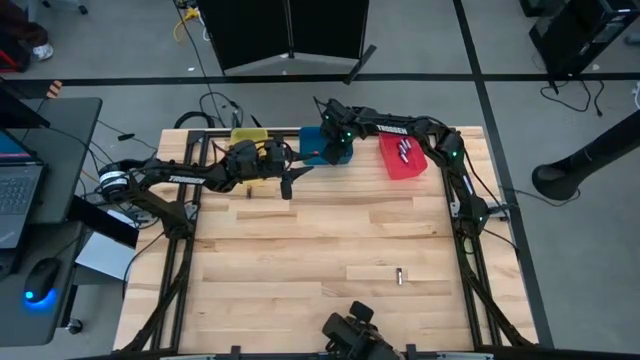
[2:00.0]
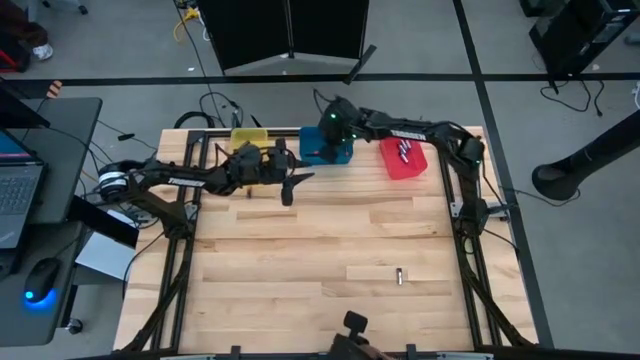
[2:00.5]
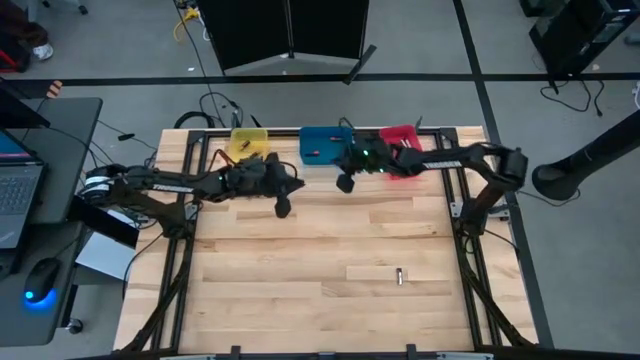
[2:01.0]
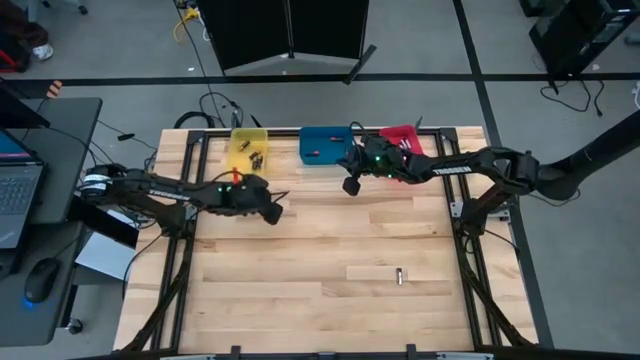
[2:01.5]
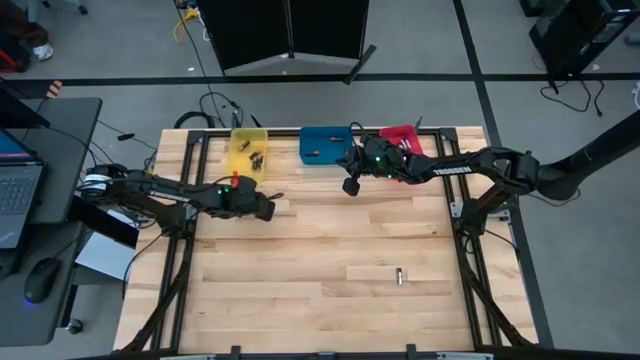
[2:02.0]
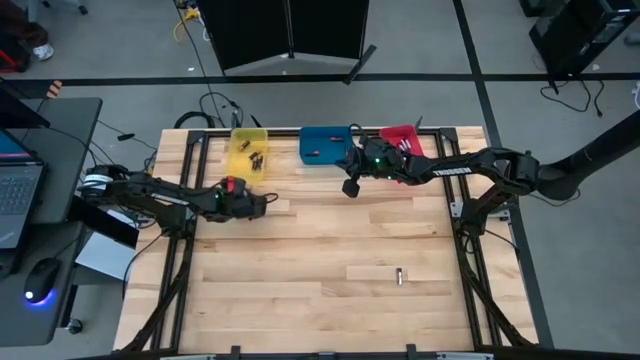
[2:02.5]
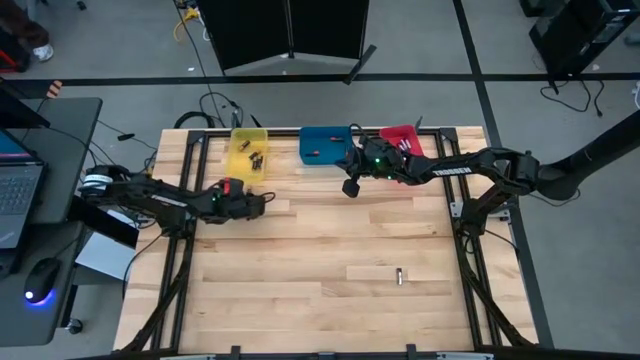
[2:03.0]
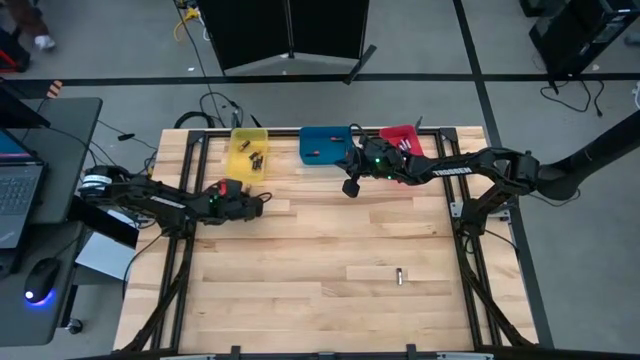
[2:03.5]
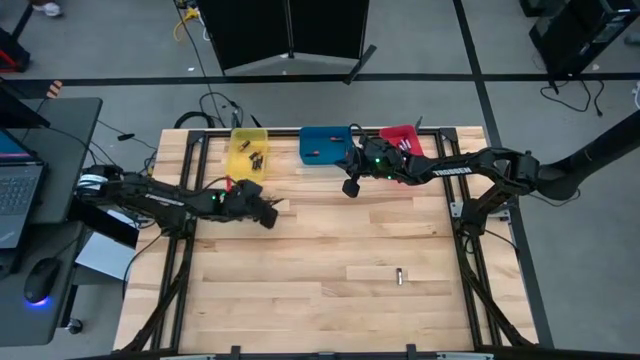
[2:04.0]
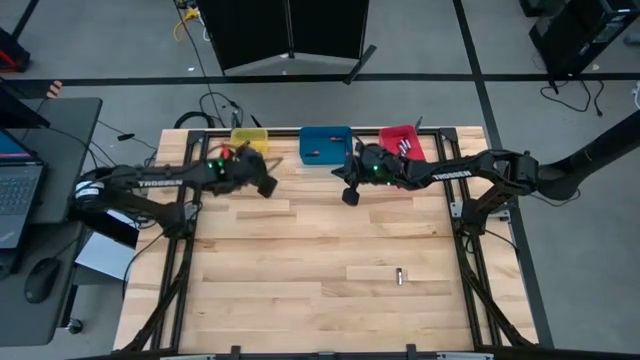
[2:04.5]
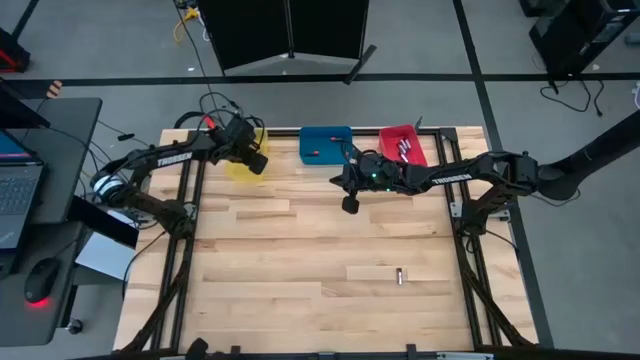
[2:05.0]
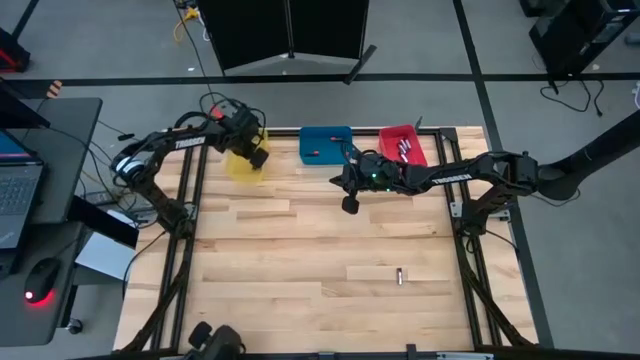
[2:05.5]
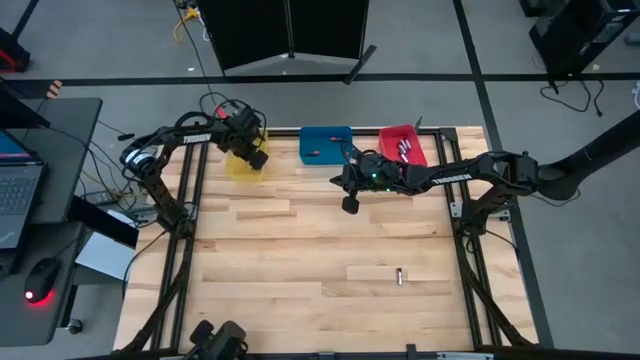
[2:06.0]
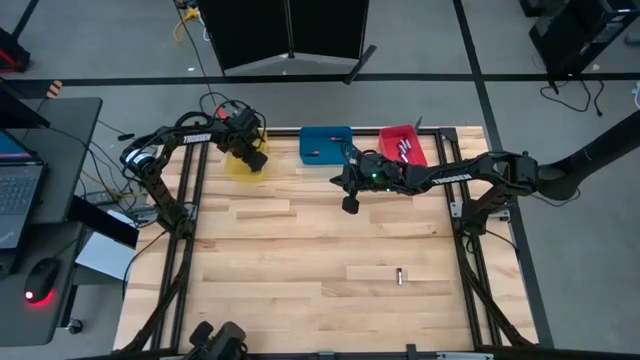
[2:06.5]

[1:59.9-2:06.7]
Task: Sort batteries
Put the black battery into the yellow bin

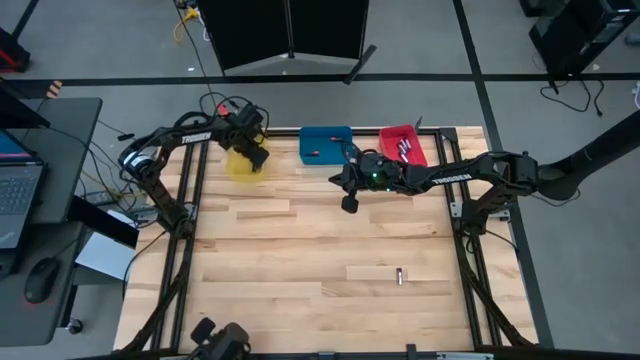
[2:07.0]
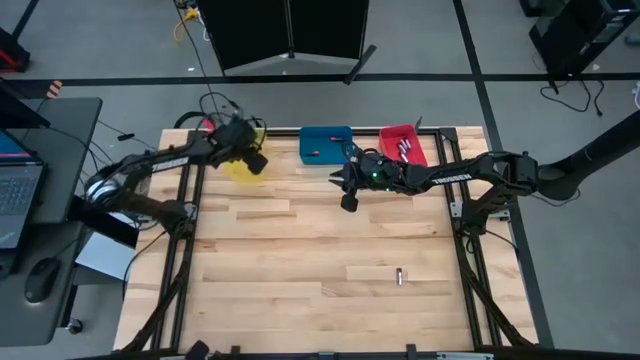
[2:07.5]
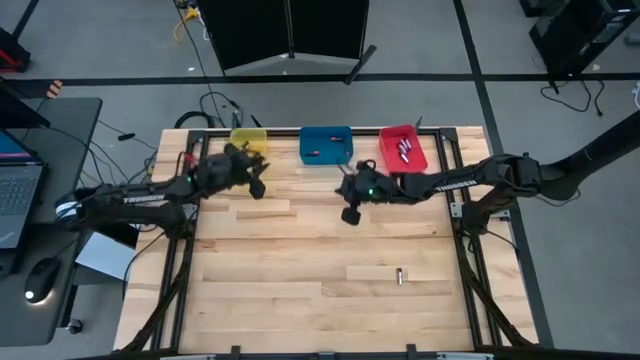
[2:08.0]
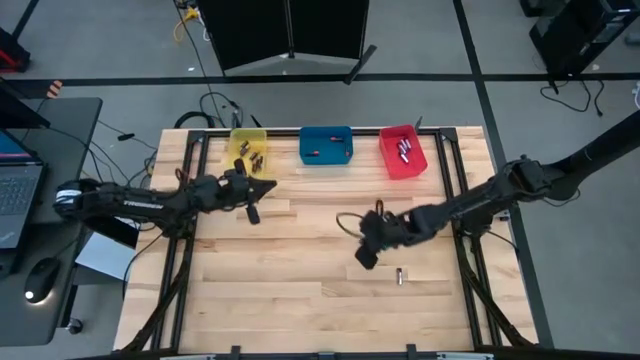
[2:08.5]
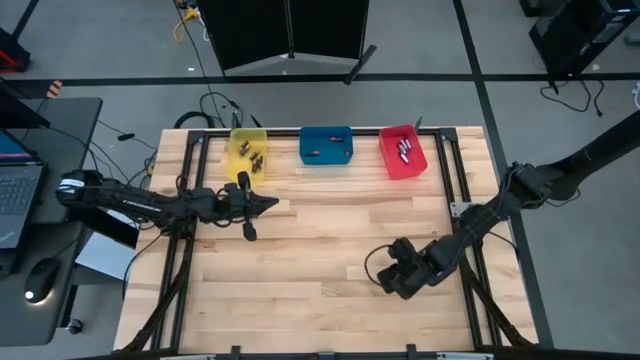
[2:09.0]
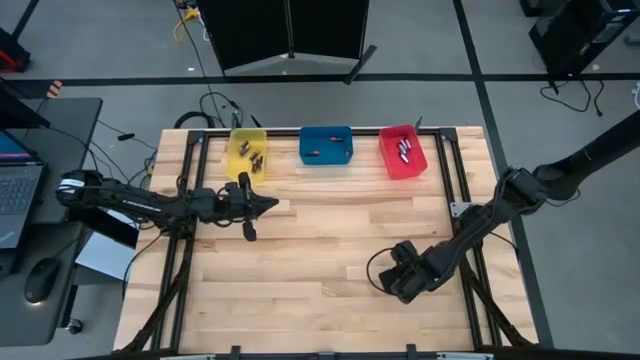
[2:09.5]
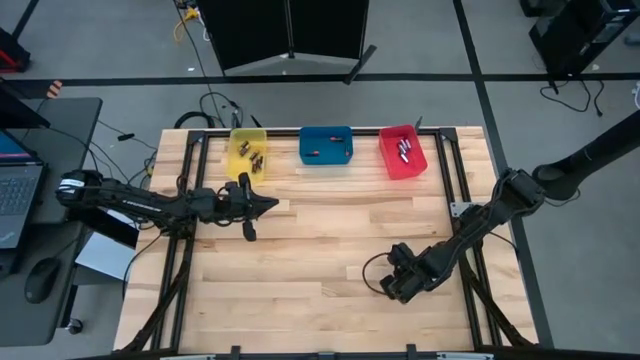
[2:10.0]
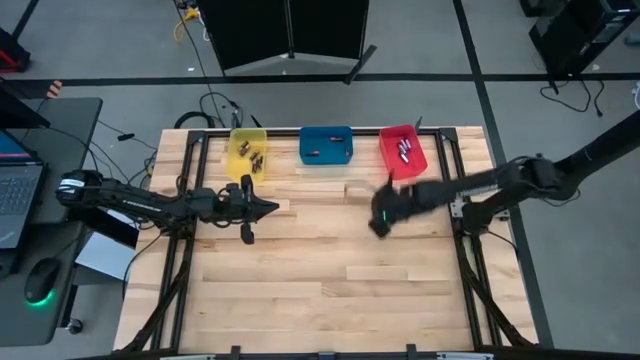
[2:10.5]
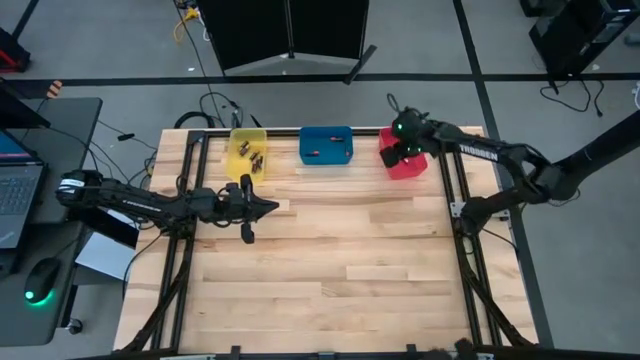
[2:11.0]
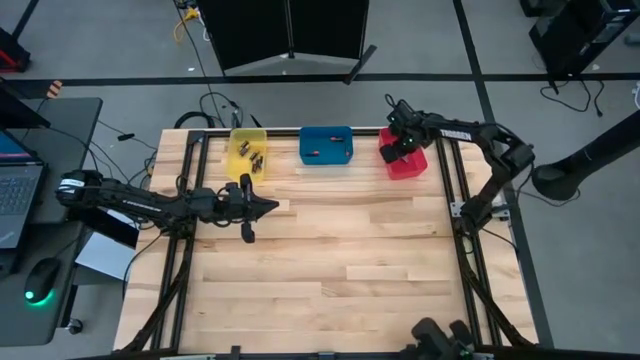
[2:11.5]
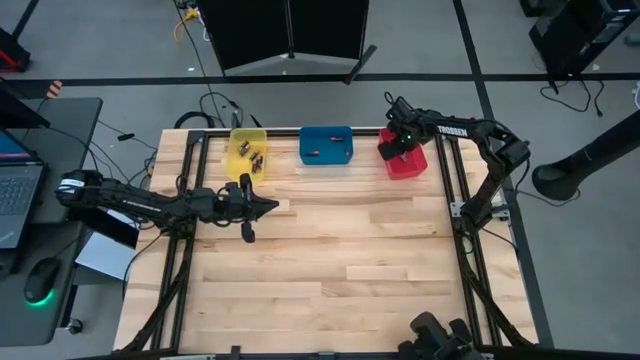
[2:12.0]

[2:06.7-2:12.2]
Put the silver battery into the pink bin

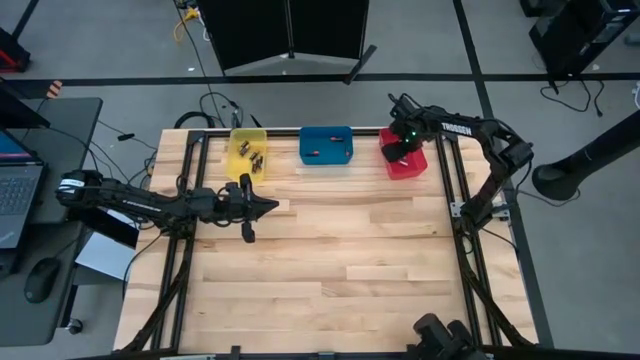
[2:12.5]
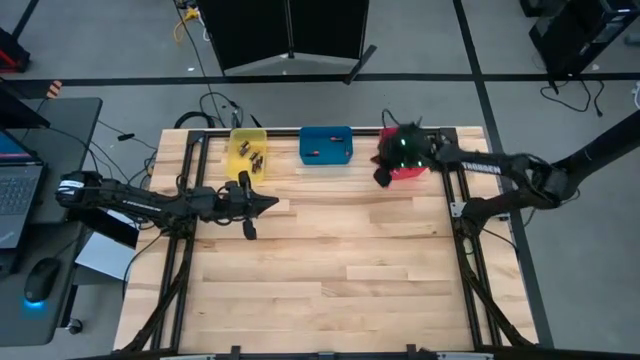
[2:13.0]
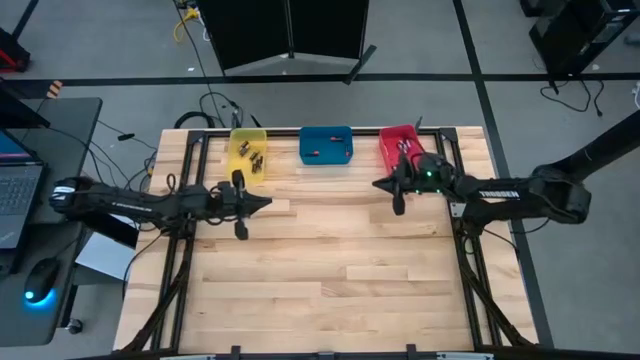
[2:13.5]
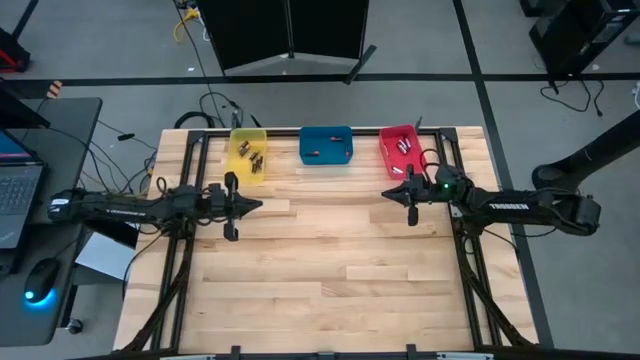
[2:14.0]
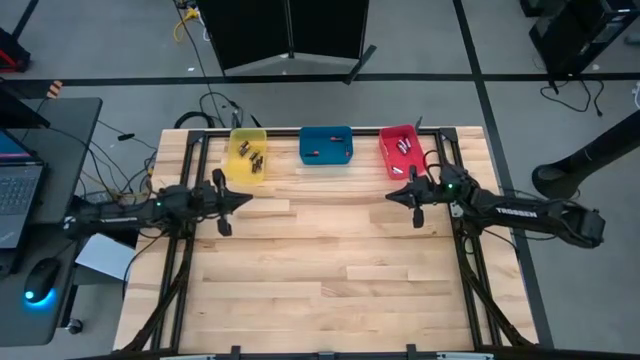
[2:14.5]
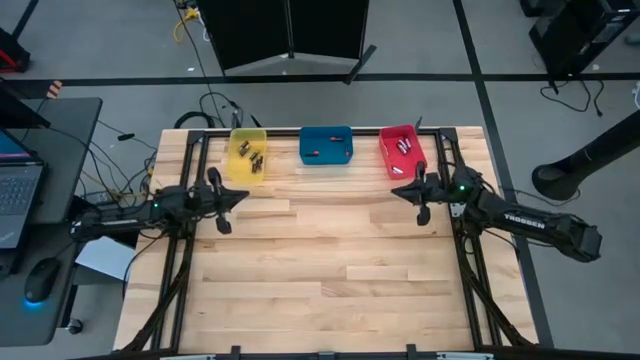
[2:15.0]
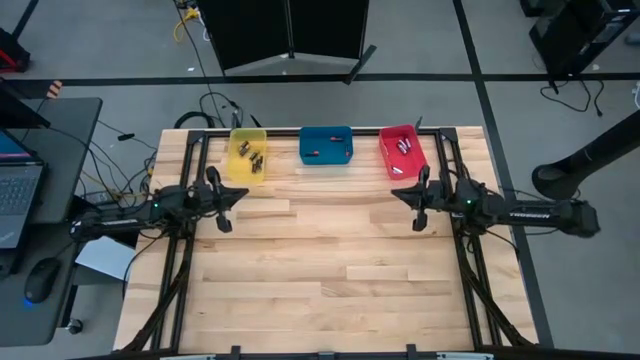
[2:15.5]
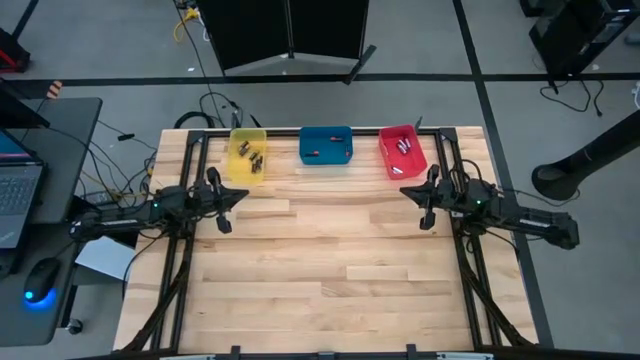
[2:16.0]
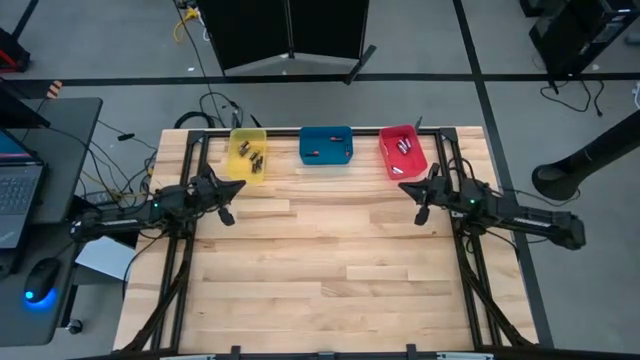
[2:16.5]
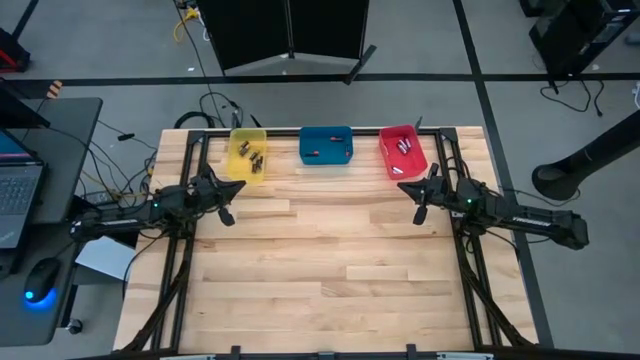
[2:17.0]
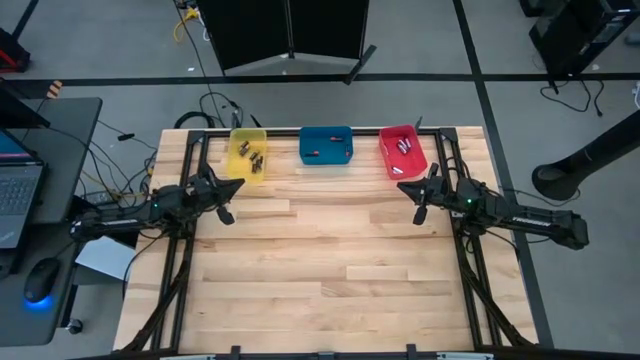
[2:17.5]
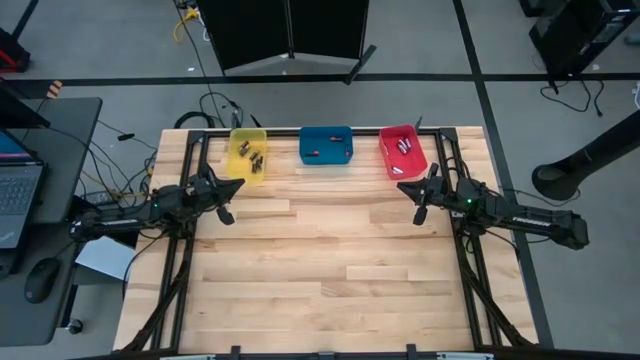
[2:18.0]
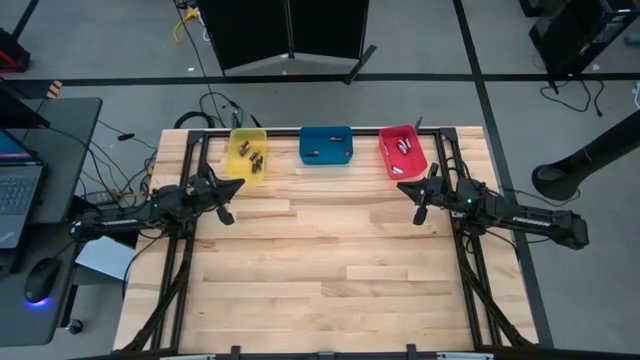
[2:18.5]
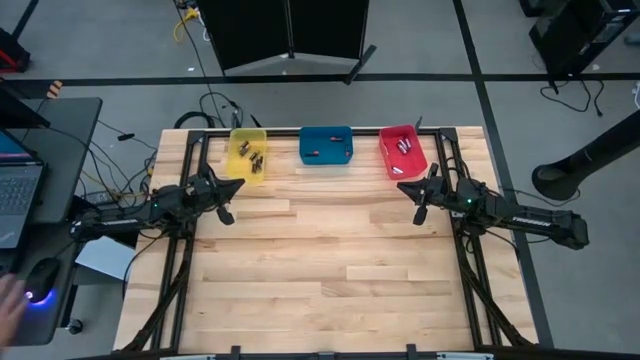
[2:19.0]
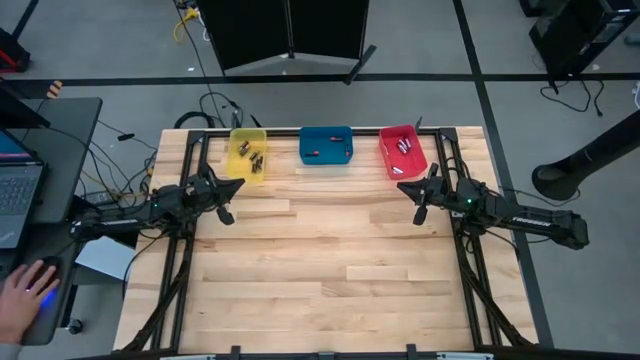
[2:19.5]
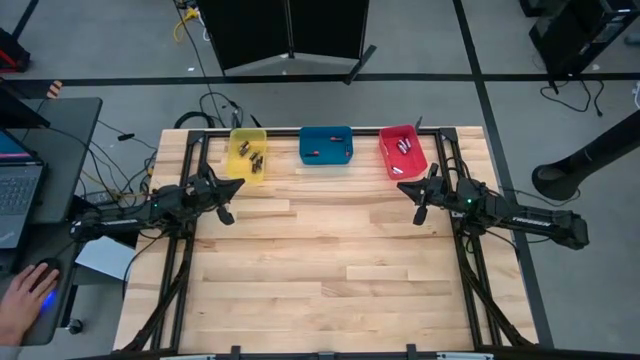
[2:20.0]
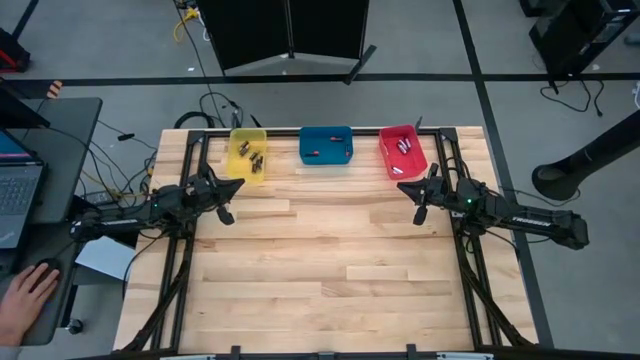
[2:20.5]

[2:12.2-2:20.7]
Return to Home Position
